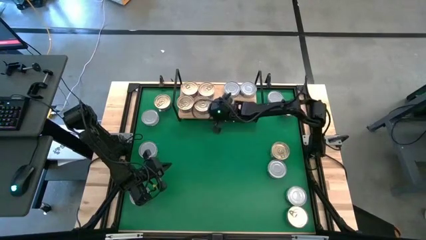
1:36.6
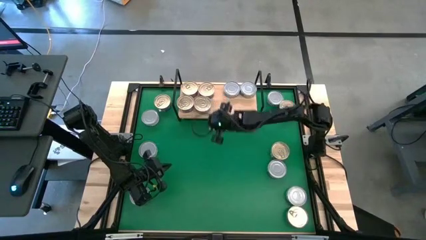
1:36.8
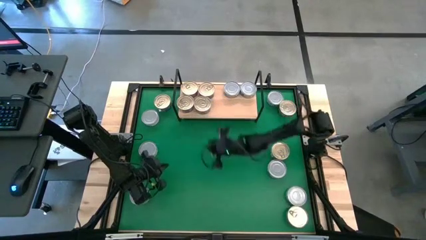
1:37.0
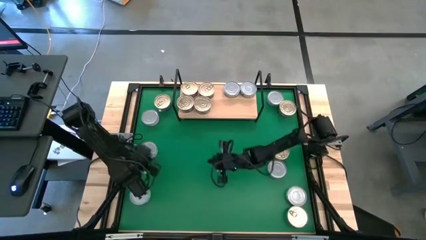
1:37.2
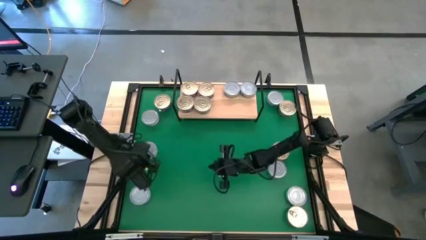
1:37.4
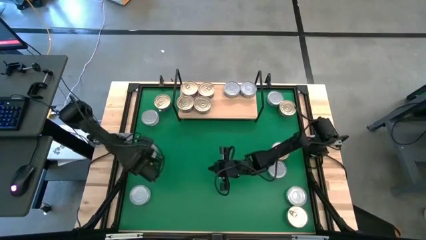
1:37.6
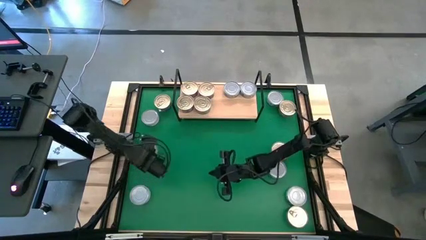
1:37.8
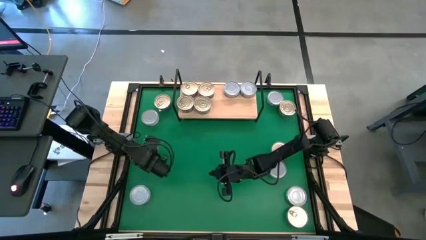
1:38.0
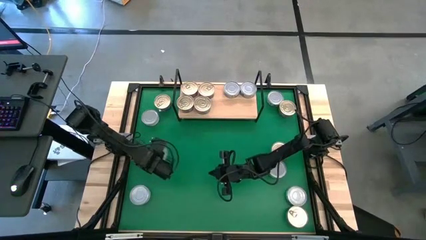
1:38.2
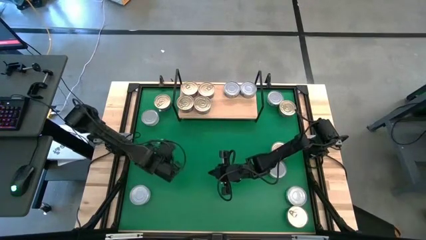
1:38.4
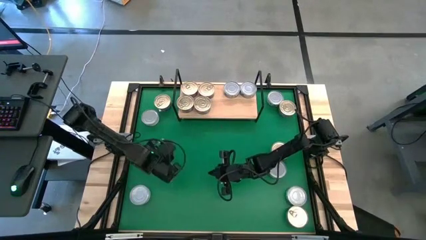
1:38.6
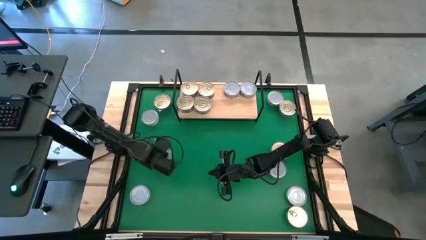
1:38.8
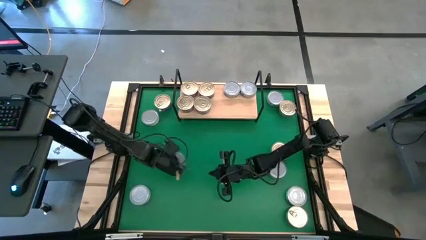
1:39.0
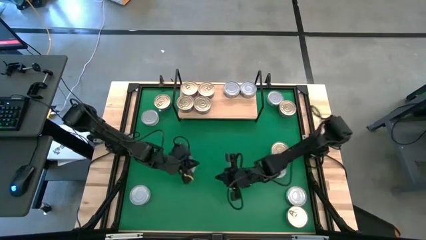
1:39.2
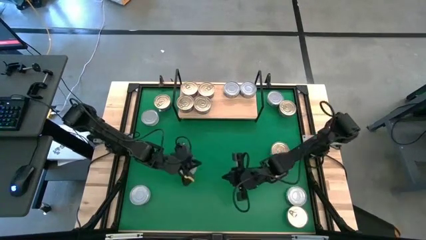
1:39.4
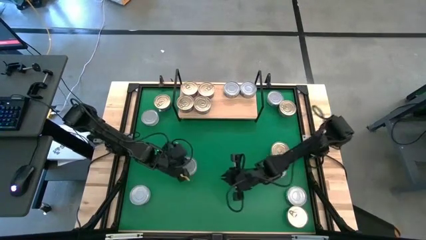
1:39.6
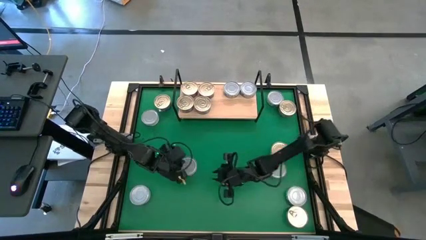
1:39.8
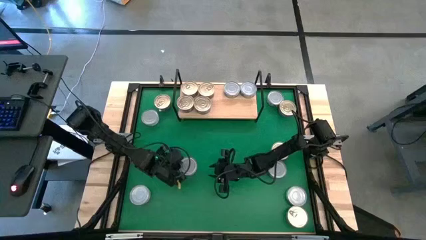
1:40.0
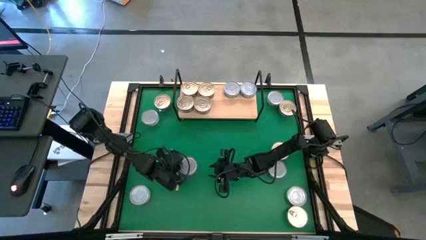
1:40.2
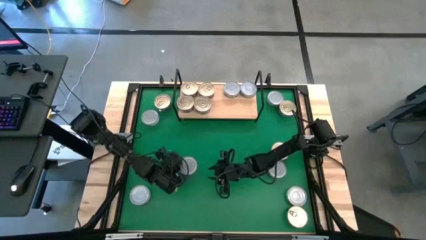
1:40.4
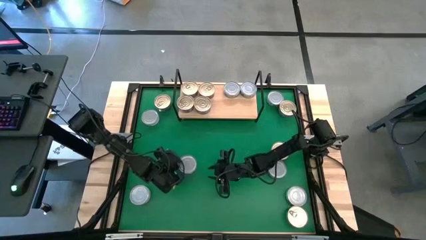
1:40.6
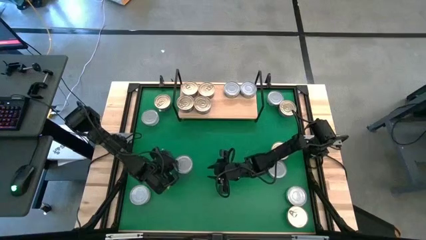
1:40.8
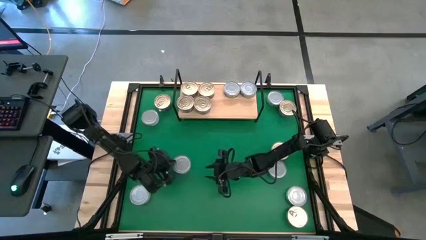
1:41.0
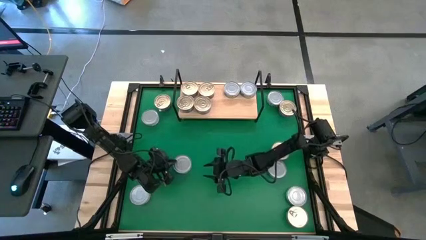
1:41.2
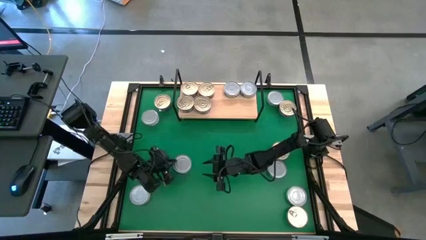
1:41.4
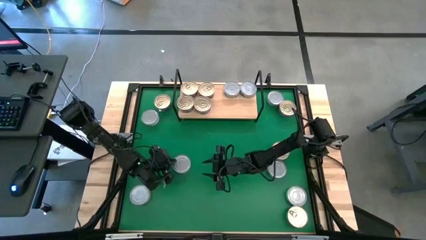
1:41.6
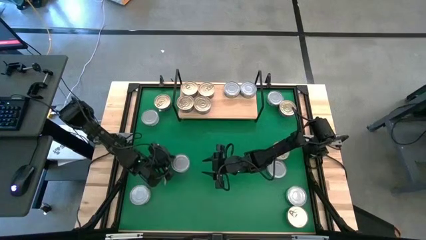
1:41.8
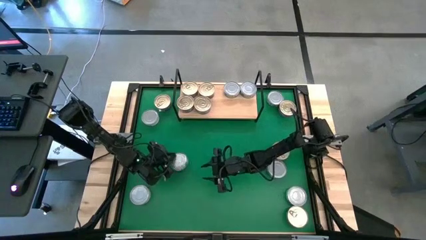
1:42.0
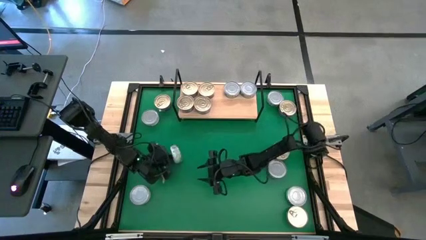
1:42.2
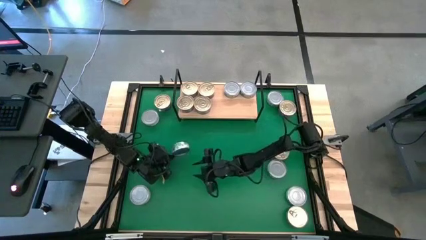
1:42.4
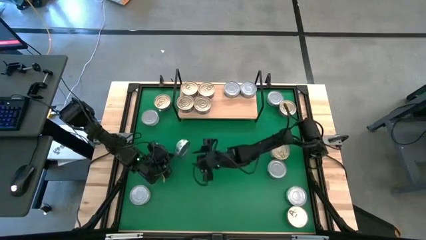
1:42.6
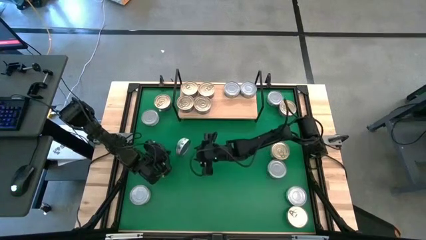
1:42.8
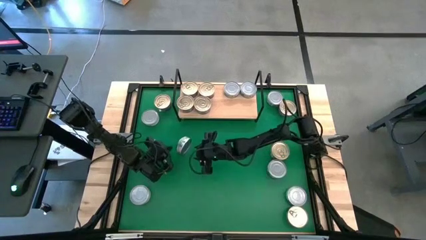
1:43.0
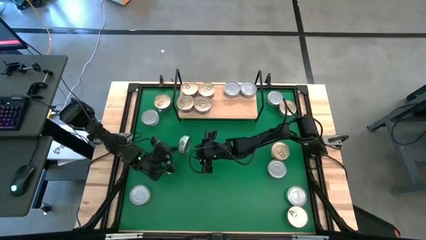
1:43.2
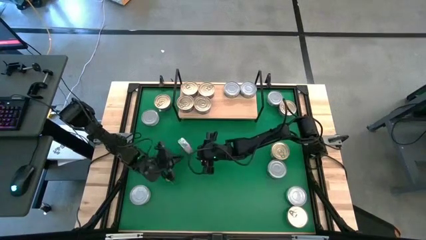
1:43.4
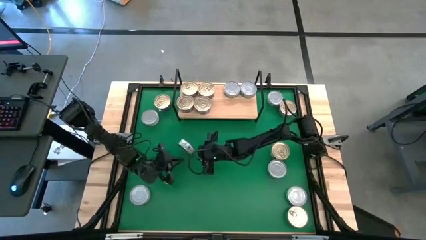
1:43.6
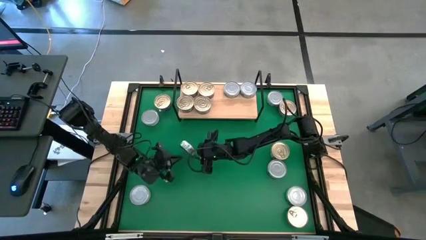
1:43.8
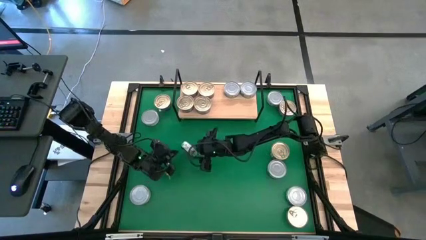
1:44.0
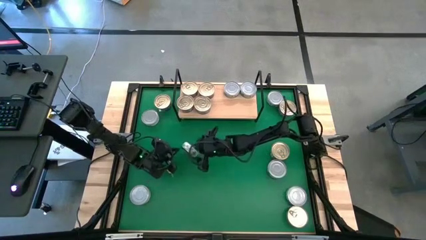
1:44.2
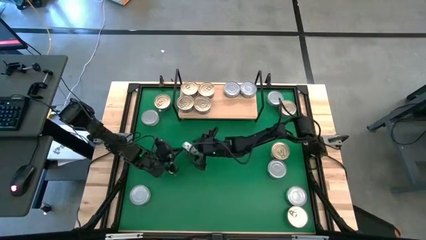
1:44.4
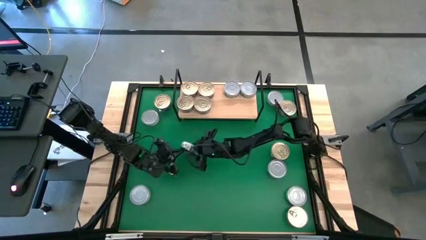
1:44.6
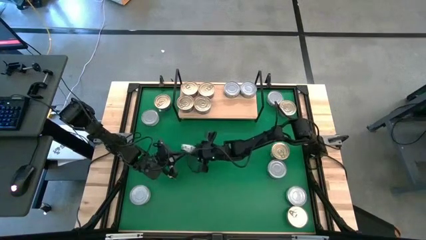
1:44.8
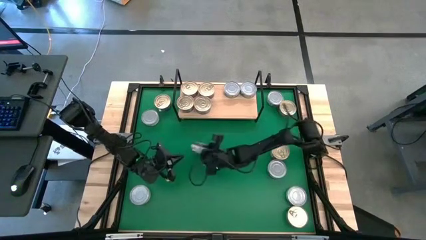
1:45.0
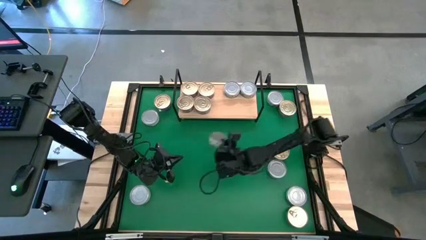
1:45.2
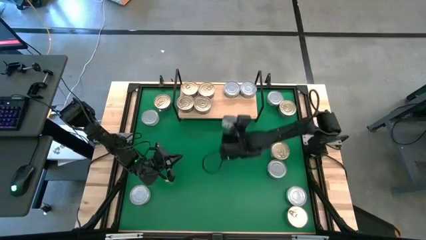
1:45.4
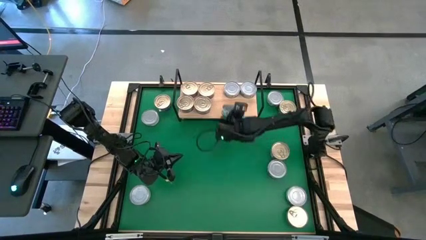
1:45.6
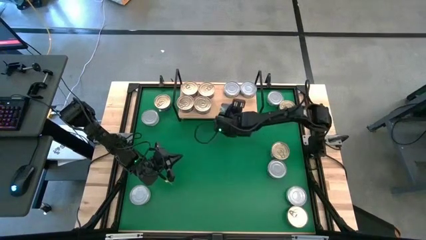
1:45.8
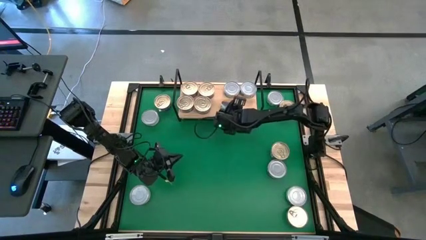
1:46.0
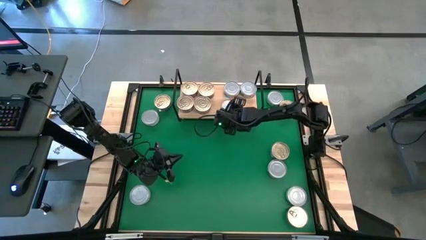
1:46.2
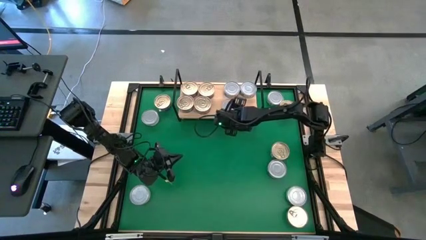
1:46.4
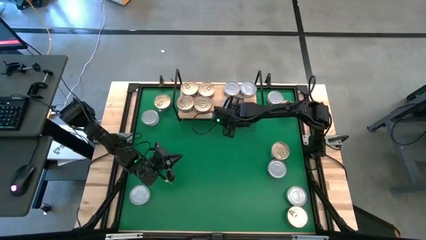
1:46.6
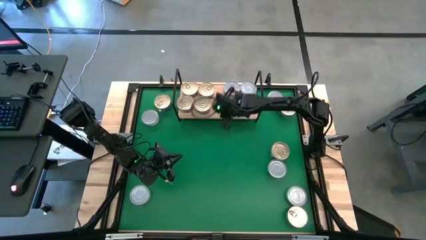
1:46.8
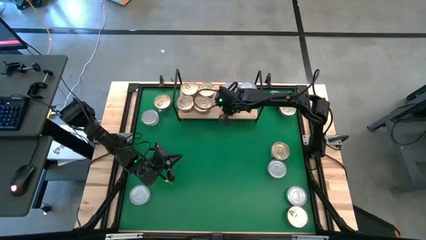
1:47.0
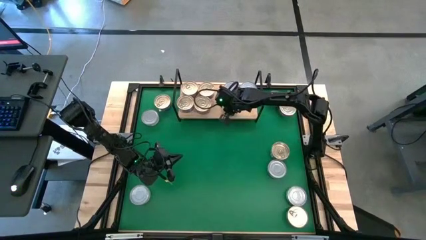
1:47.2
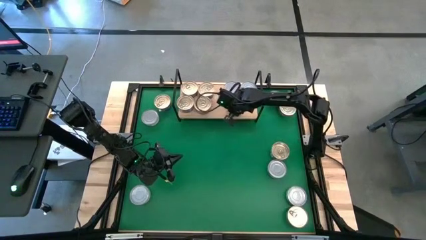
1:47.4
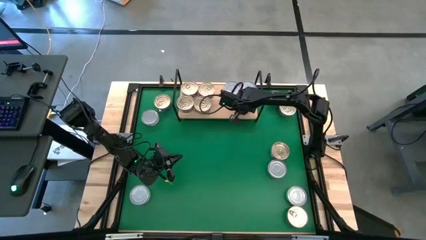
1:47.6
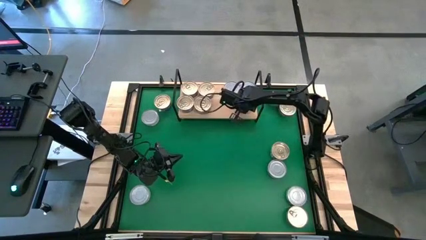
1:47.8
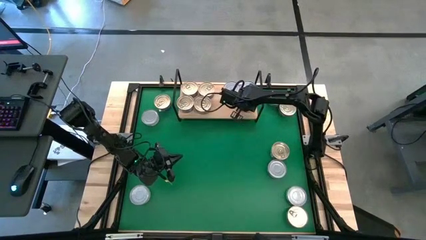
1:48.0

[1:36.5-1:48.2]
Task: Stack canned seafood by type on shelf
Put the green white tuna can on the shelf

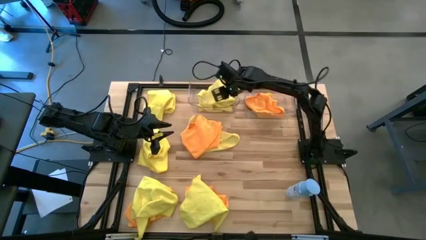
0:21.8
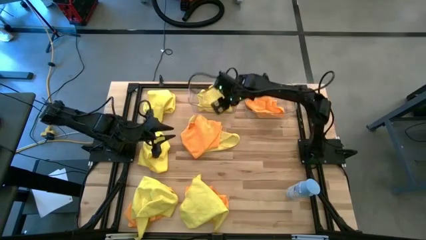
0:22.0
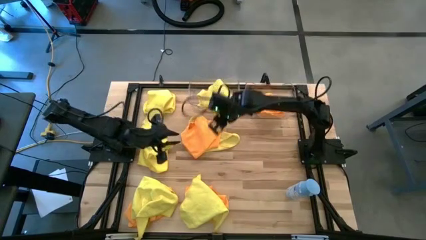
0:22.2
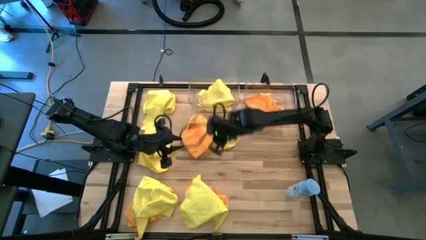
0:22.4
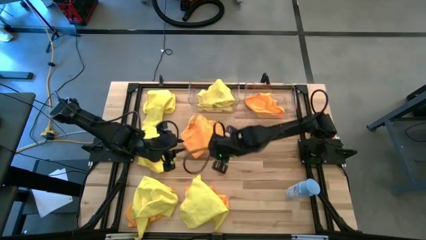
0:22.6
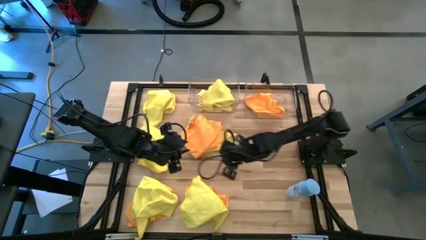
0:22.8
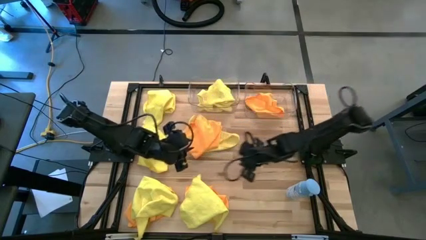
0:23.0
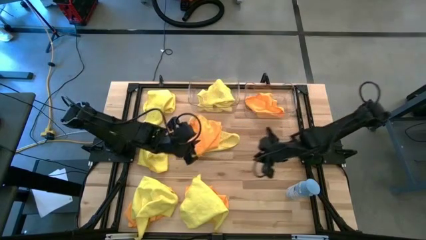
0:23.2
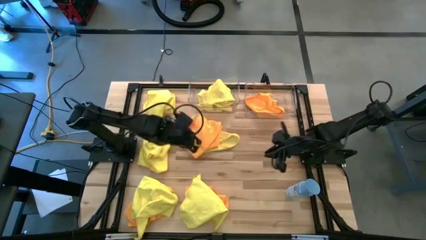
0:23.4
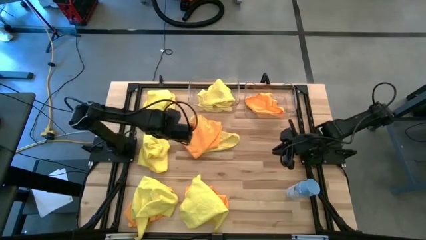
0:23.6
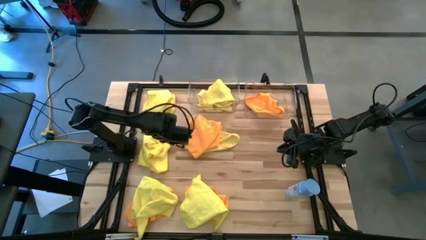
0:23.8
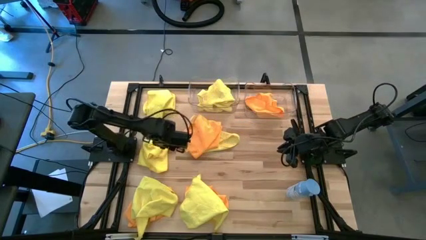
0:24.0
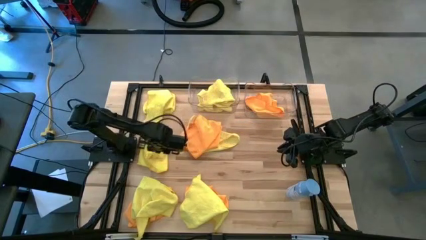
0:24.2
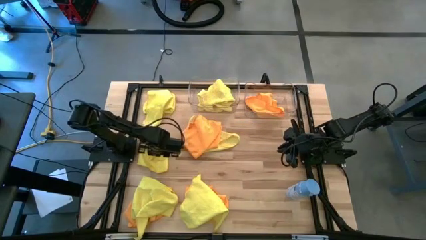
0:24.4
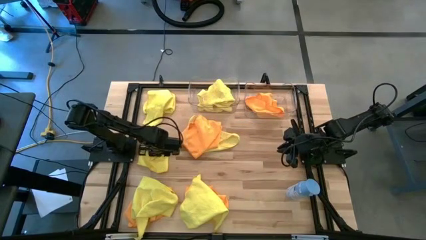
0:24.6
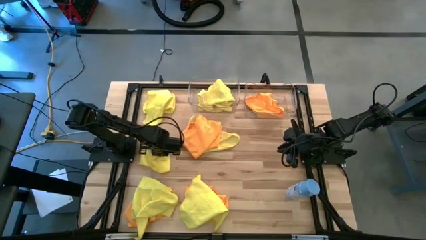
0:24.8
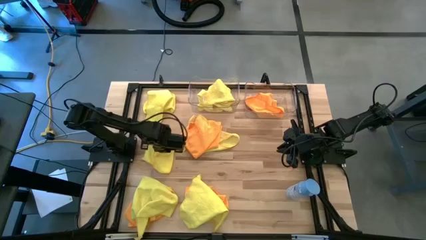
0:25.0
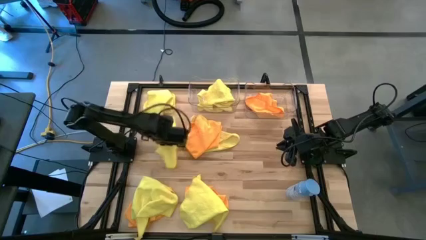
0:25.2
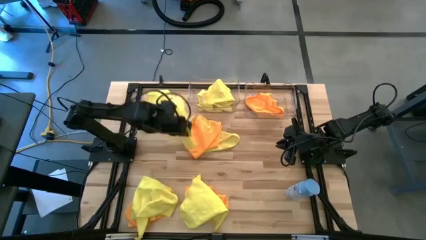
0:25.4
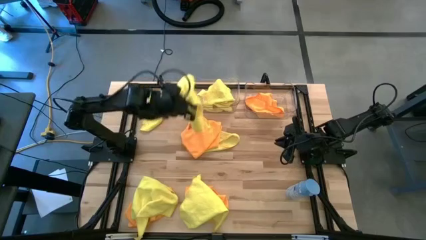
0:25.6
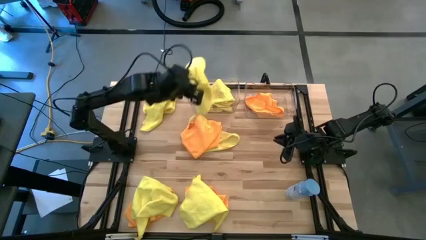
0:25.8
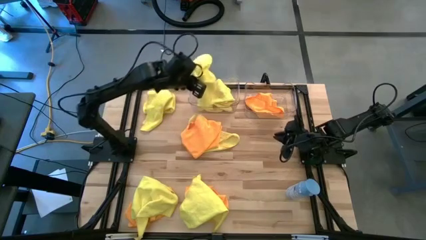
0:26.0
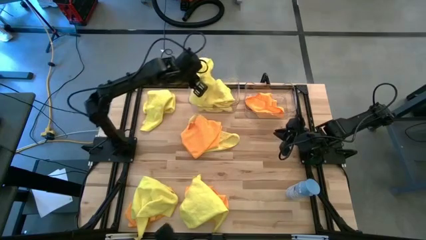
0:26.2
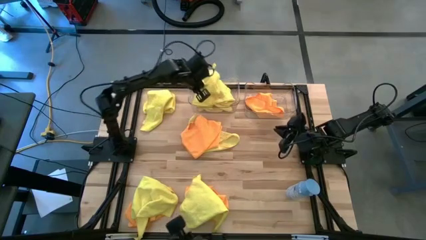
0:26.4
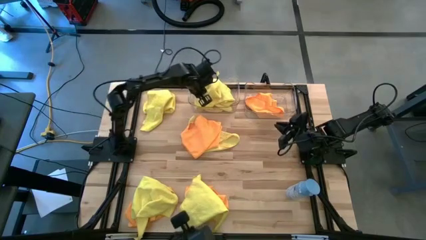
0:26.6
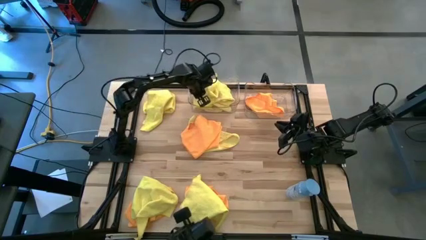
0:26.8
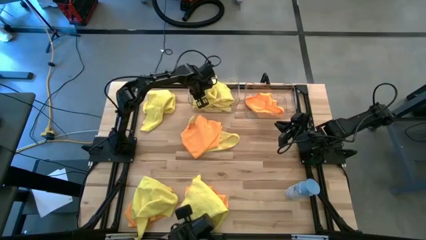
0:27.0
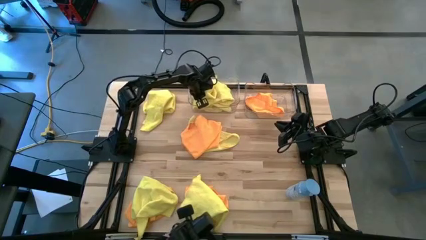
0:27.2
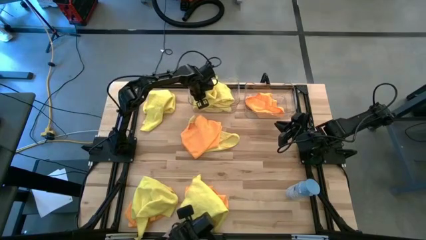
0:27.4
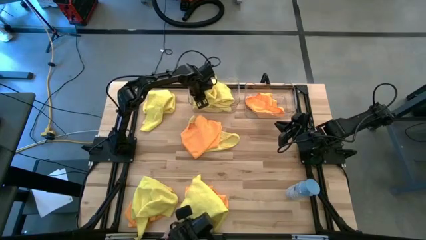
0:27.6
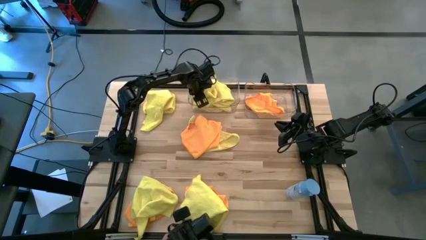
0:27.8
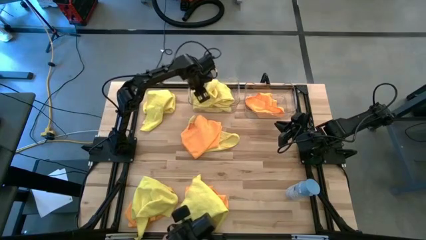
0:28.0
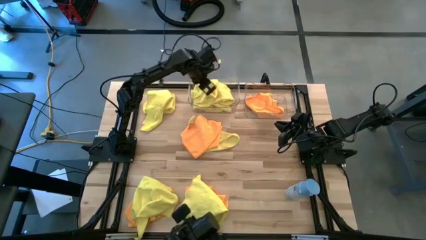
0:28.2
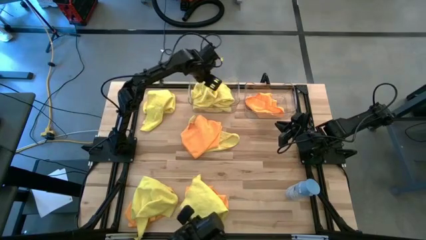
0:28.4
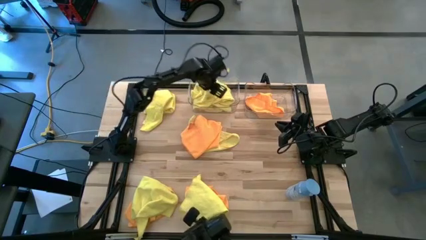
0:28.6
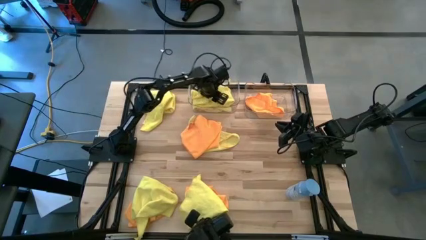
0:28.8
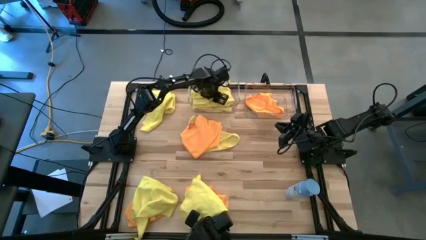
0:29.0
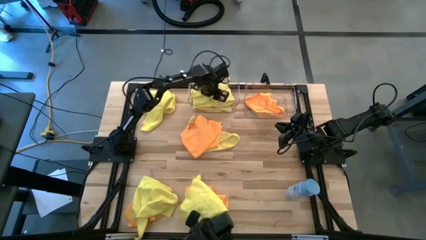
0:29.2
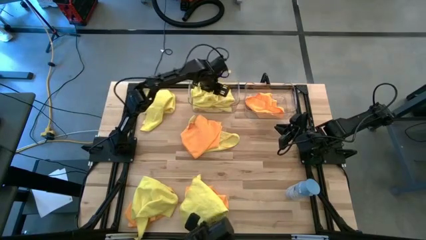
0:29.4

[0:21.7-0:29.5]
Task: Sort microfiber towel by color & place in baskets
Put the yellow microfiber cloth into the left transparent bin
